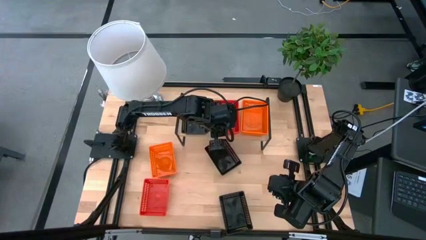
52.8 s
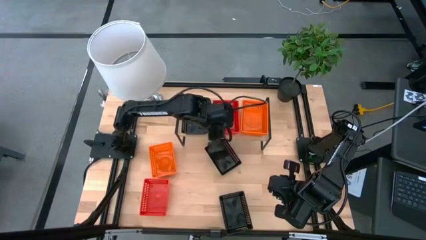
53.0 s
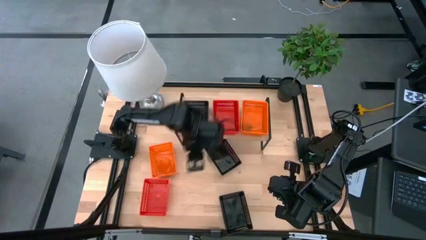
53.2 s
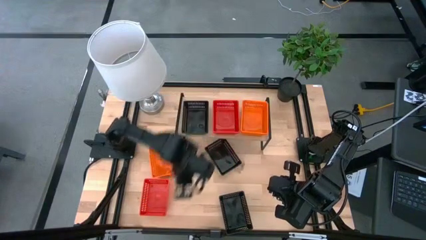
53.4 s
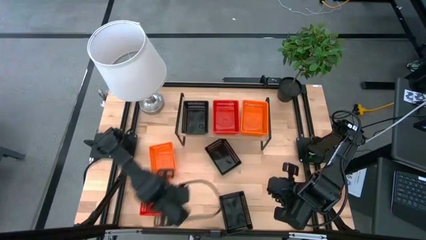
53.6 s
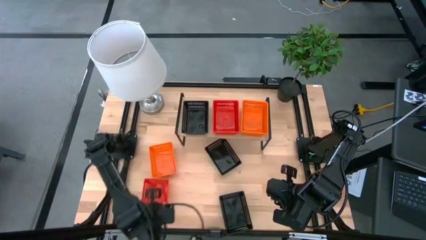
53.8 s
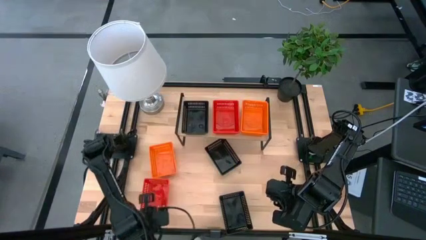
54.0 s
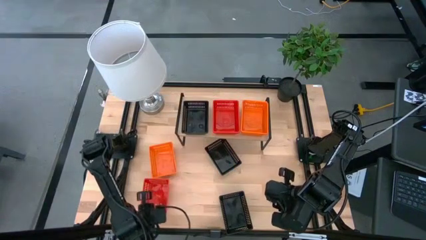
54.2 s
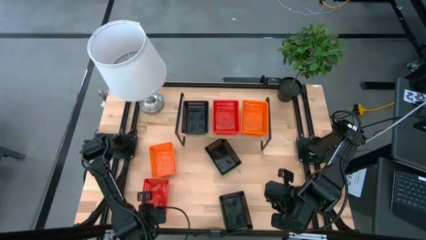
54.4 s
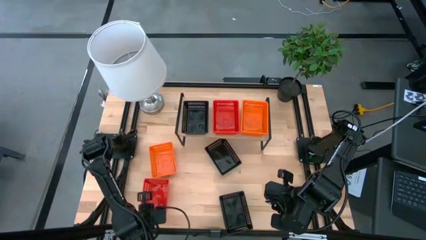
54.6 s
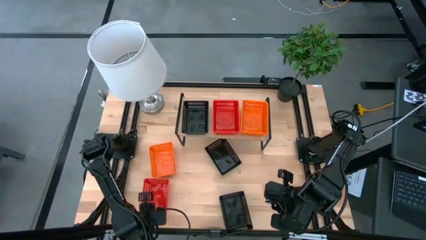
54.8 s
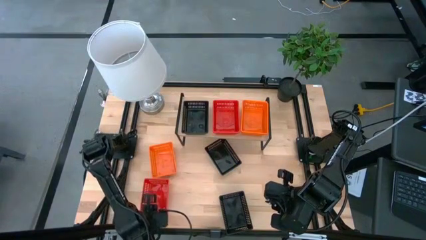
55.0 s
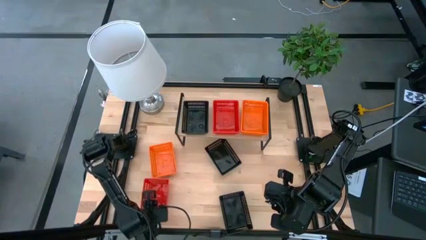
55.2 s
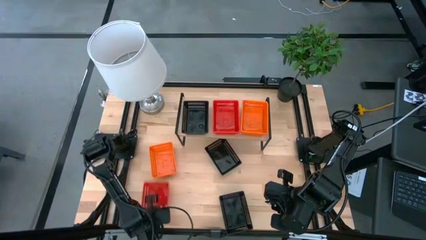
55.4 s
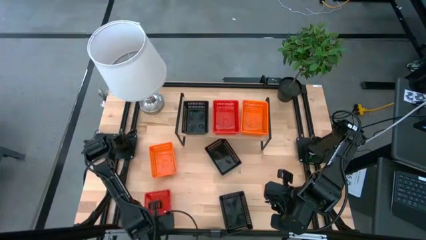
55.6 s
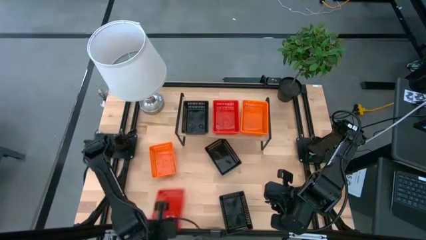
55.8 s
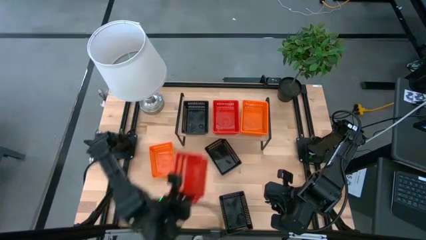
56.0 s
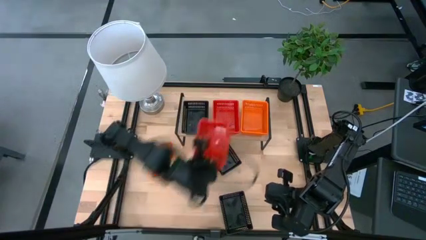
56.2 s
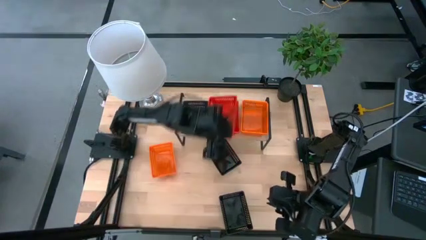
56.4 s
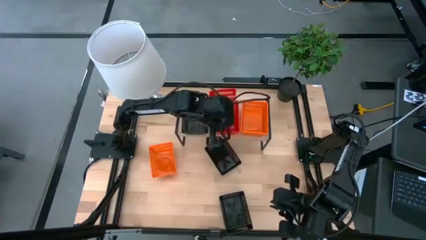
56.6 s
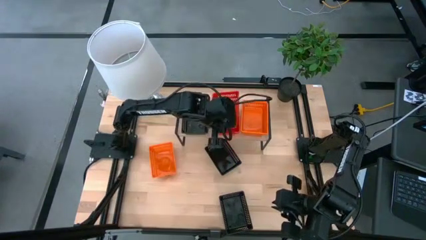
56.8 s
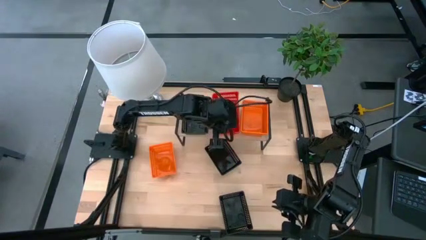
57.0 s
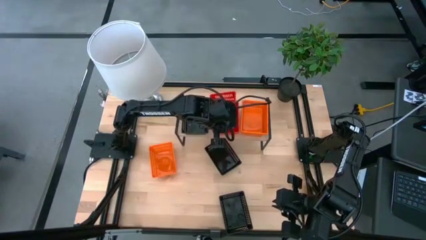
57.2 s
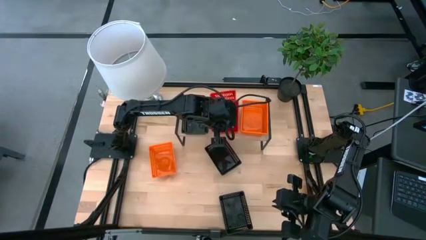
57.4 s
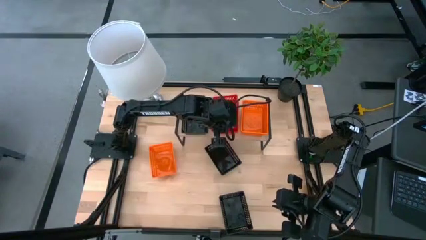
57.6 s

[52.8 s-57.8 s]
Task: Stack baskets on shelf by color
Stack the red bin on top of the red bin on the shelf

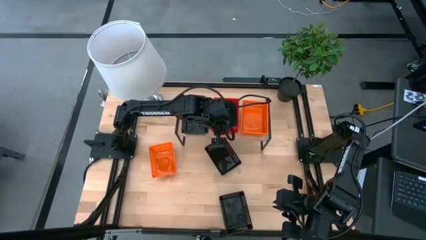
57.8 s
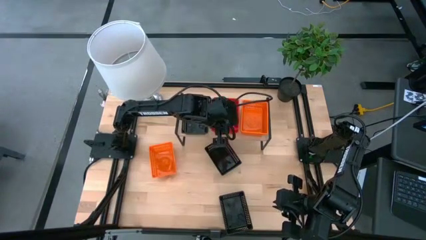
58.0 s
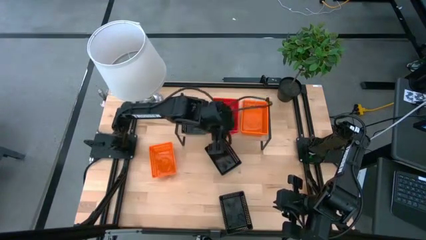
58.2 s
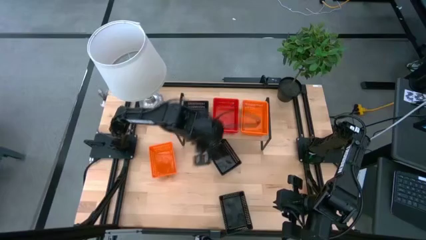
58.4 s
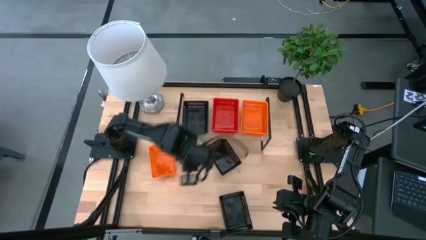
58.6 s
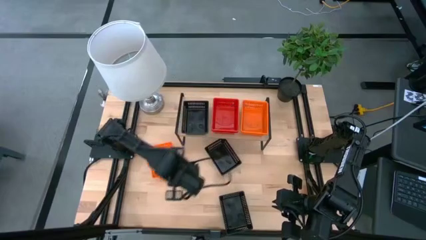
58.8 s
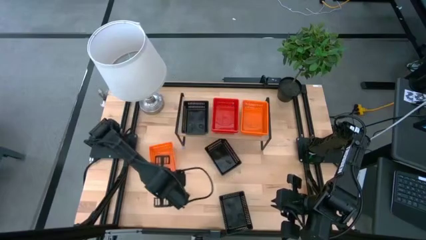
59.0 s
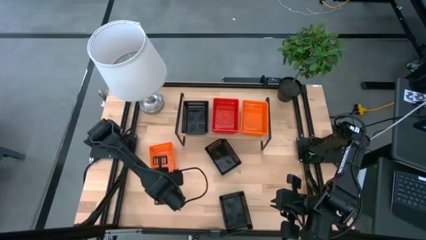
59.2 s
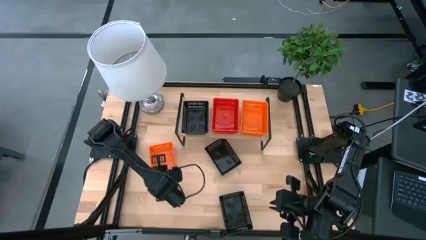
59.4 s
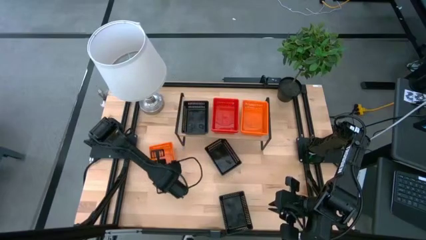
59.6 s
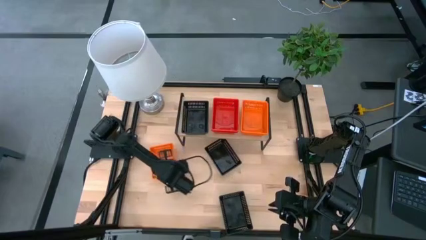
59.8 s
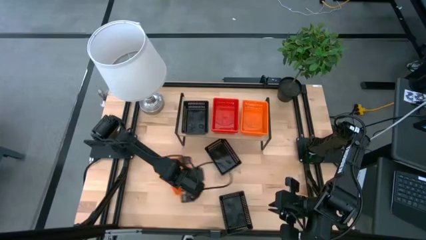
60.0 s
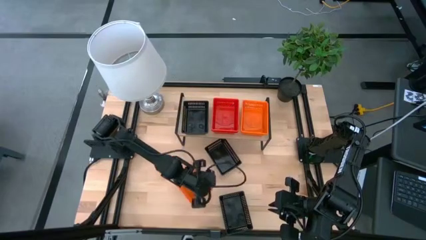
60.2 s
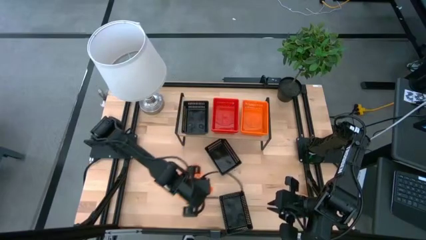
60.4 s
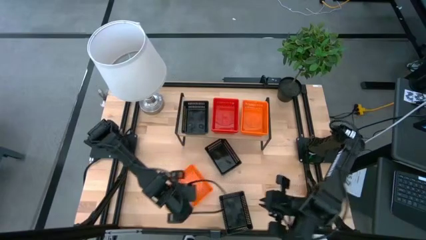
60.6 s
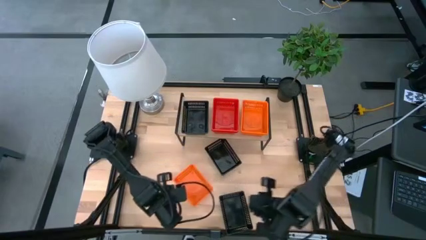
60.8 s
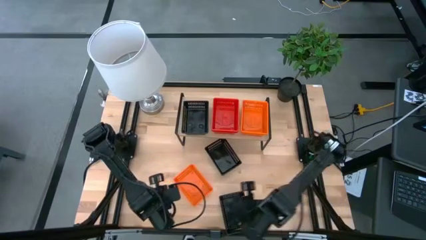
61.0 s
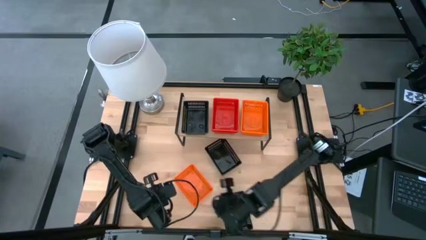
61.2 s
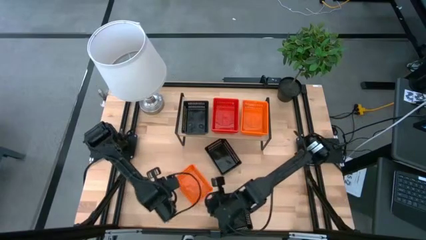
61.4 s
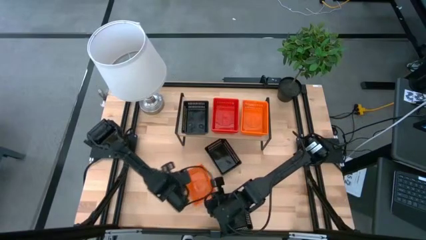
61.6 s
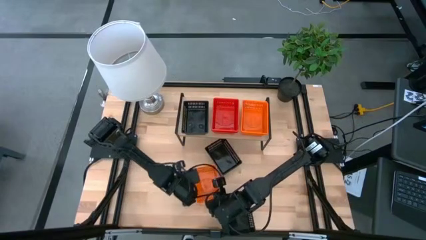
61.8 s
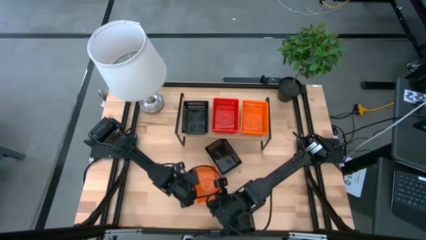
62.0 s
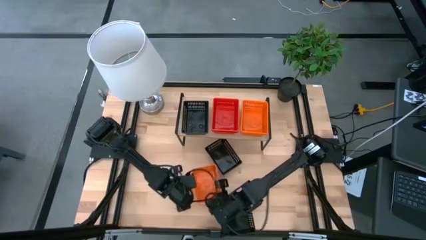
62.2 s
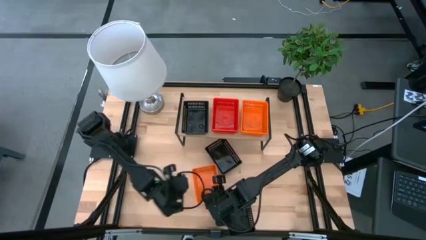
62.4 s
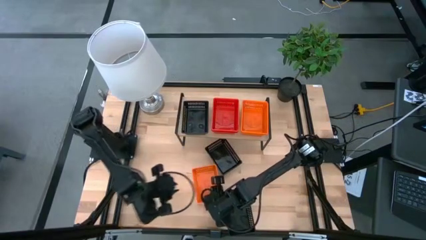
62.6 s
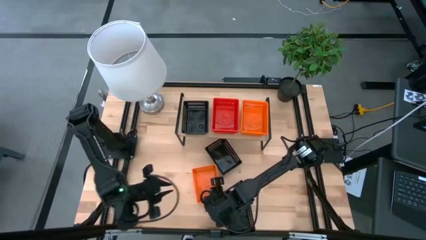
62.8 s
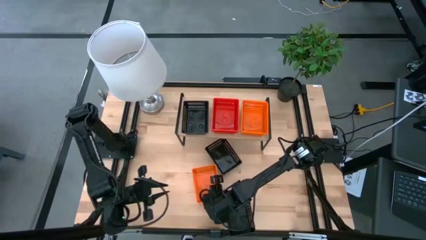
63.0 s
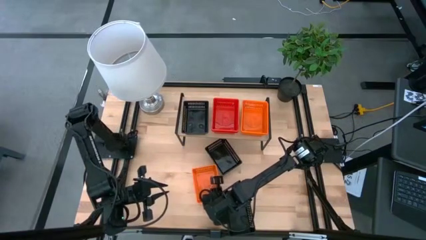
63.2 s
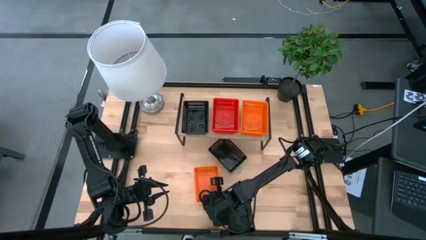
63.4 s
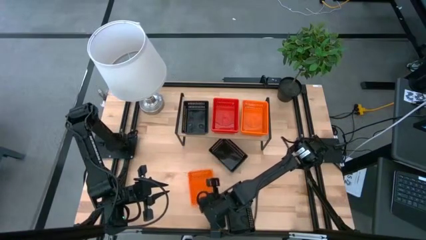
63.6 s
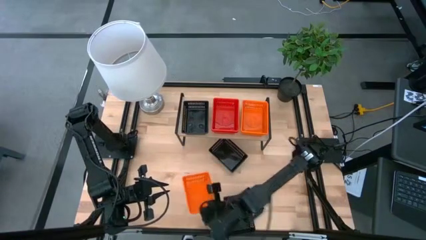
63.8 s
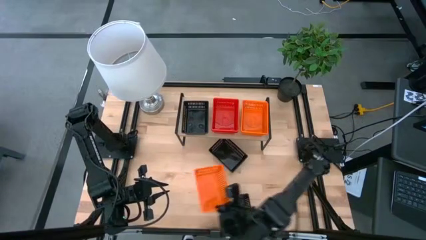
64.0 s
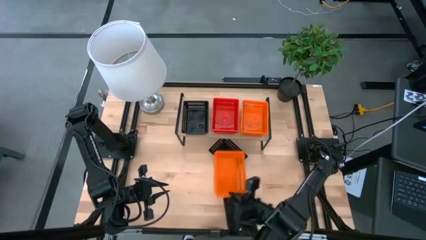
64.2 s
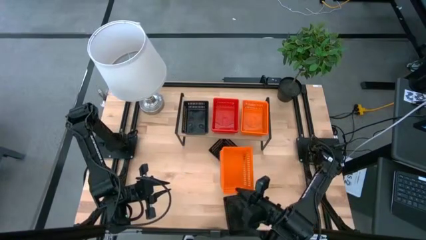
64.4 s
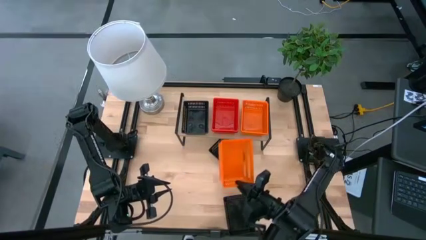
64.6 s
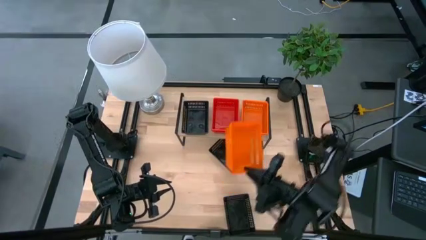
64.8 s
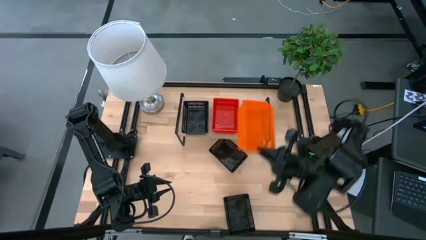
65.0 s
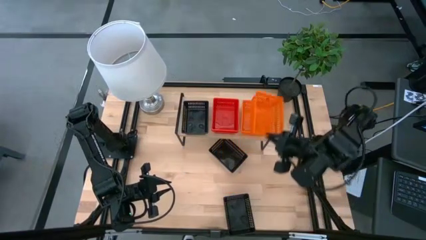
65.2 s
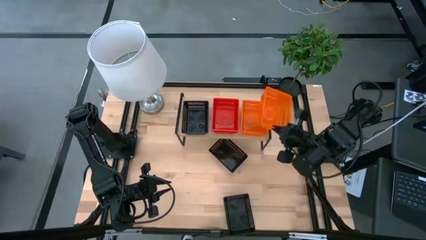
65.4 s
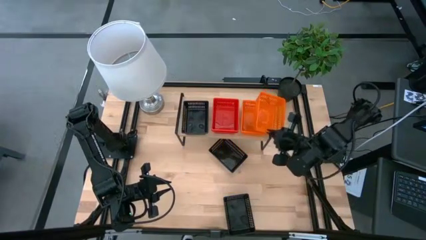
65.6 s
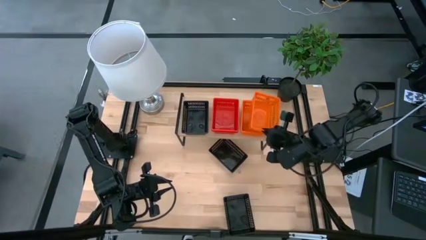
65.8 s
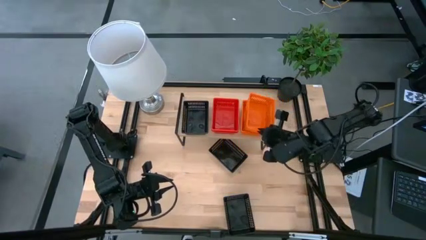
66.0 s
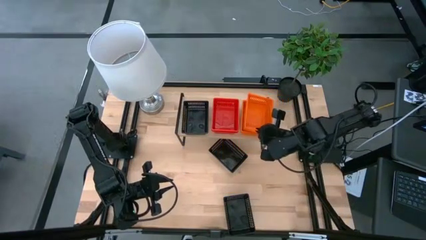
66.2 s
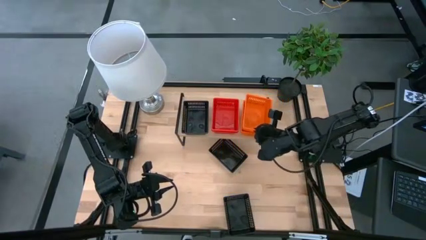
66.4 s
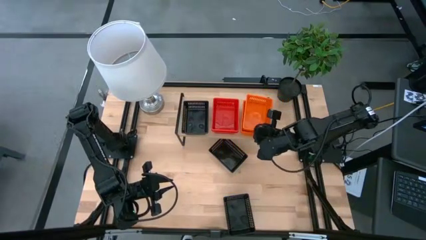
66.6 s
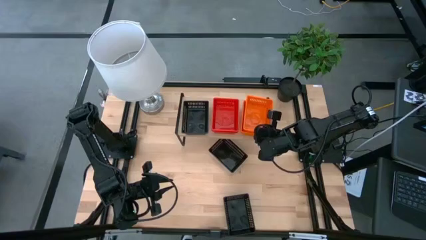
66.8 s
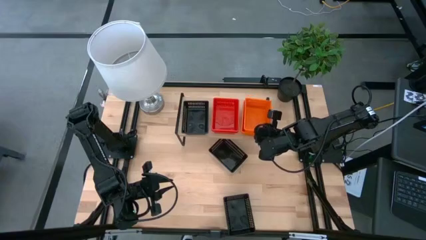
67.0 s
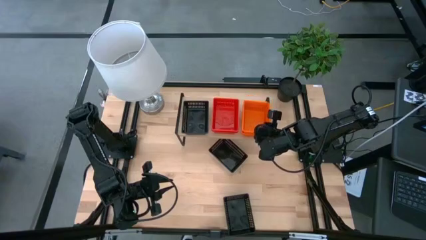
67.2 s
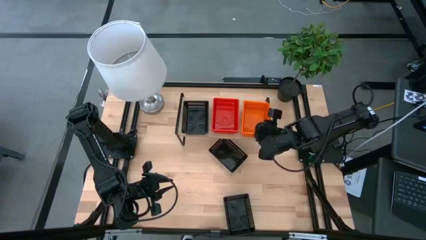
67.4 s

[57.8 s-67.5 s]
Stack the orange bin on top of the orange bin on the shelf

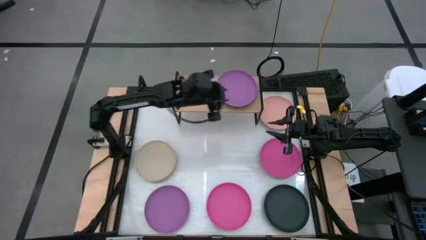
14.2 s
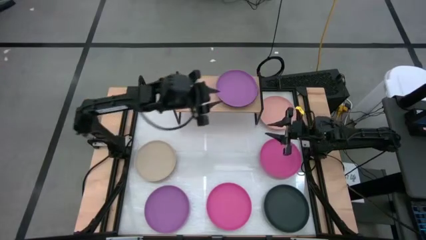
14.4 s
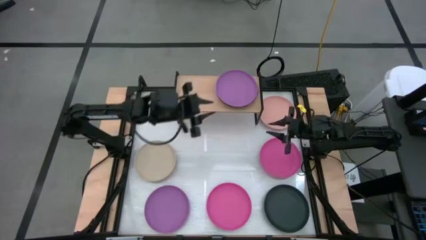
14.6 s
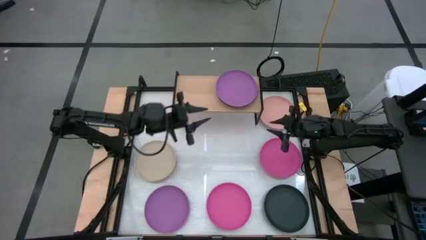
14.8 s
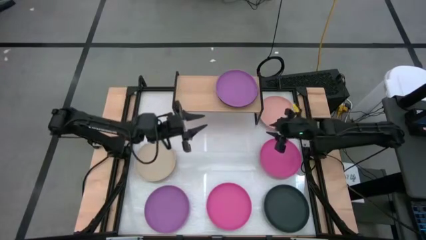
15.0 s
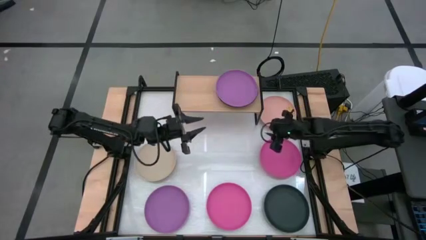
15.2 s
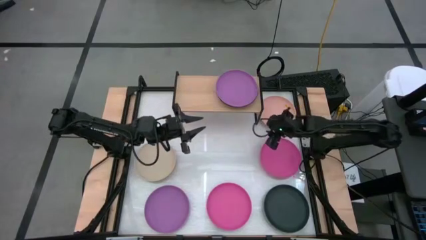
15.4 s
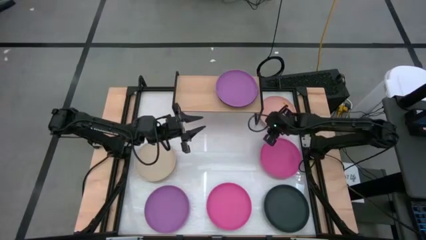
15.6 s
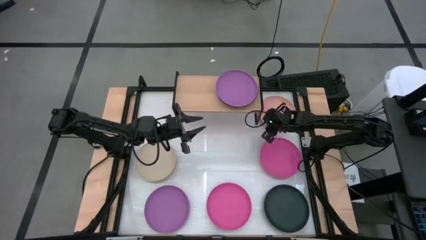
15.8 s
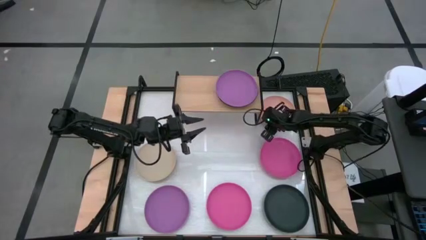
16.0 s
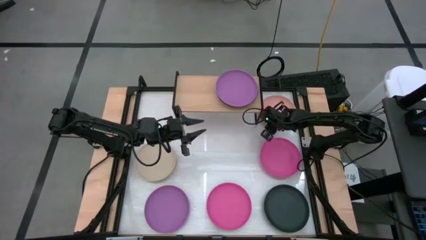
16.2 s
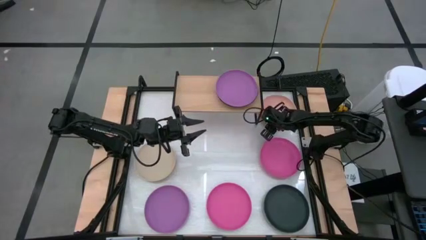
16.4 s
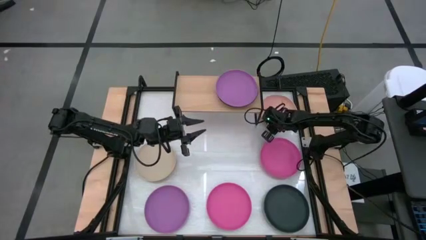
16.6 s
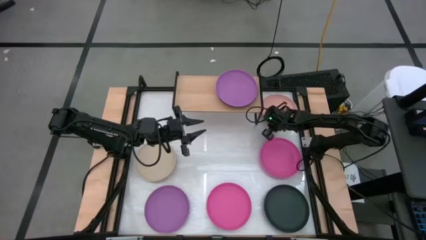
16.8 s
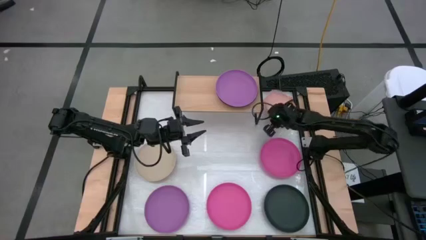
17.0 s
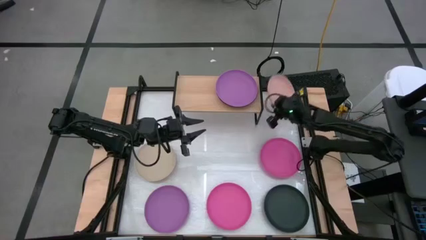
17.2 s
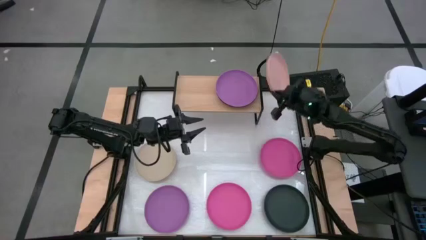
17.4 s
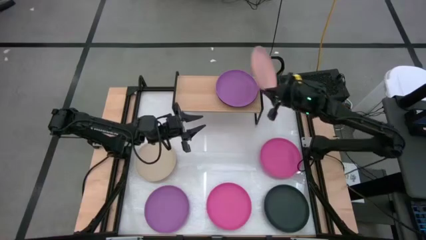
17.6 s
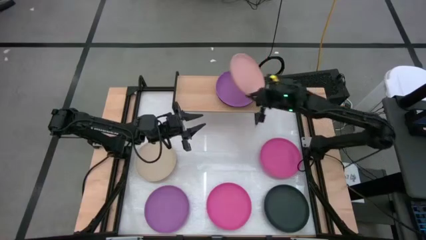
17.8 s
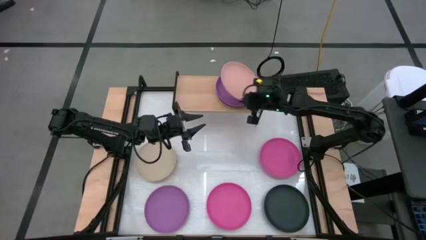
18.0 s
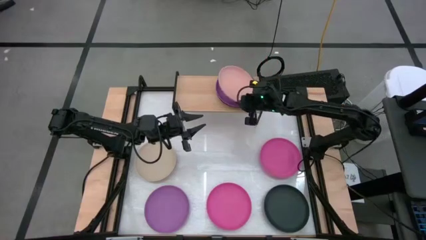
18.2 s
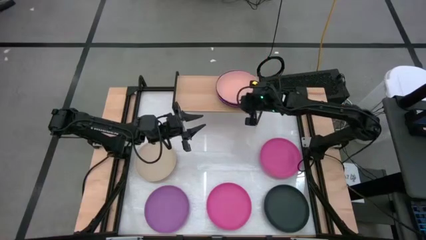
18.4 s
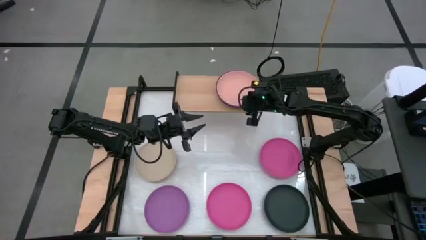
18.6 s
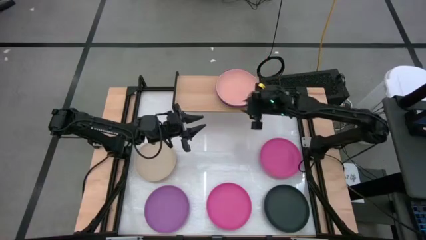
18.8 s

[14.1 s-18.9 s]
Task: Place and stack plates onto a shelf
Stack the pink plate on top of the violet plate on the shelf
